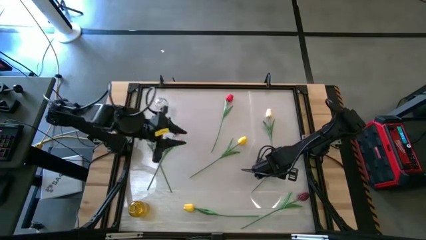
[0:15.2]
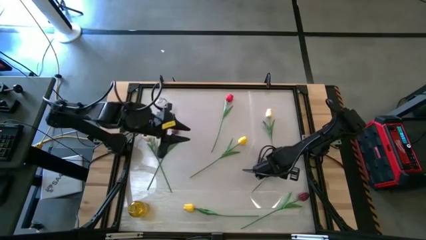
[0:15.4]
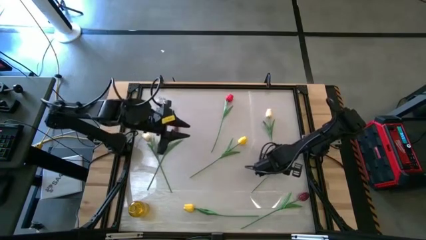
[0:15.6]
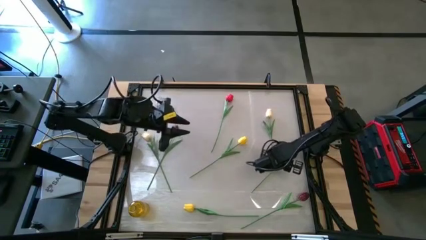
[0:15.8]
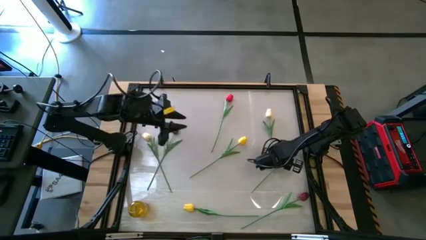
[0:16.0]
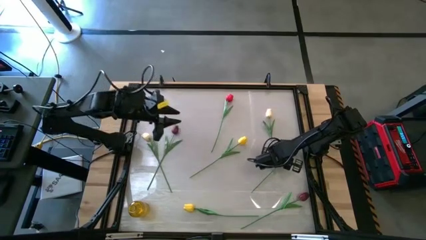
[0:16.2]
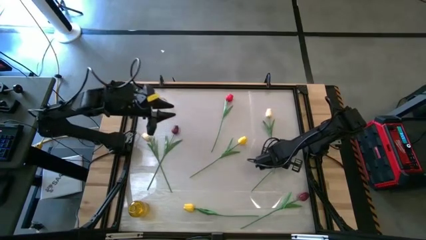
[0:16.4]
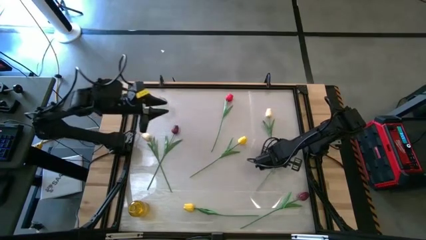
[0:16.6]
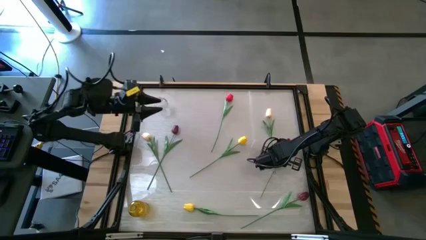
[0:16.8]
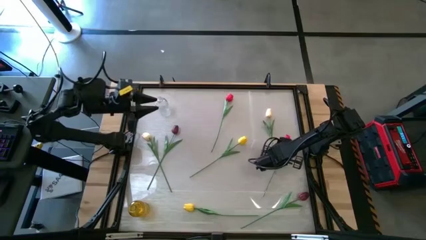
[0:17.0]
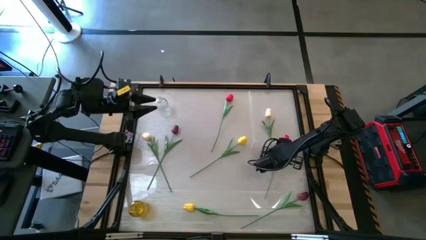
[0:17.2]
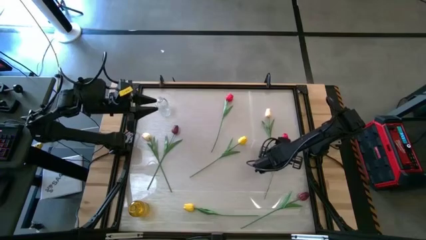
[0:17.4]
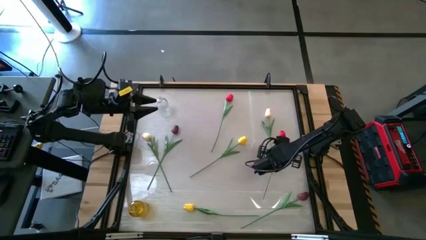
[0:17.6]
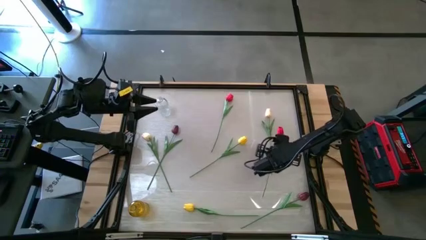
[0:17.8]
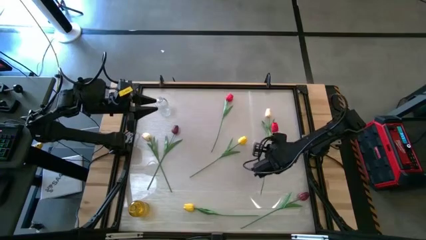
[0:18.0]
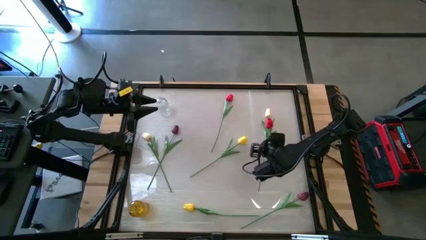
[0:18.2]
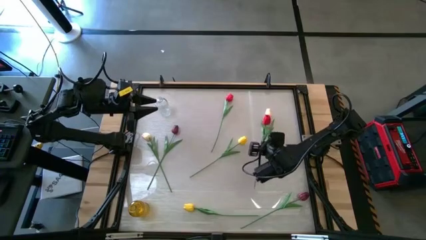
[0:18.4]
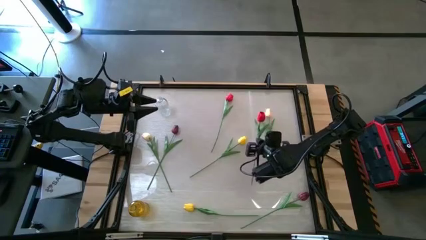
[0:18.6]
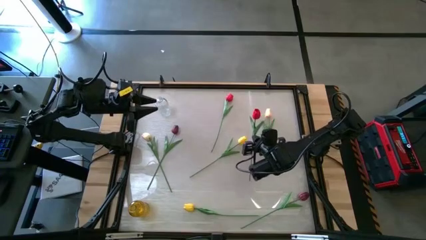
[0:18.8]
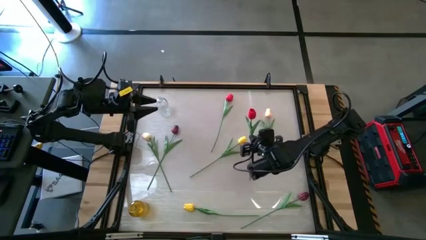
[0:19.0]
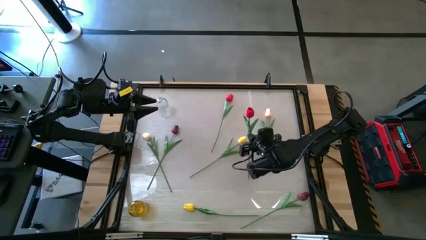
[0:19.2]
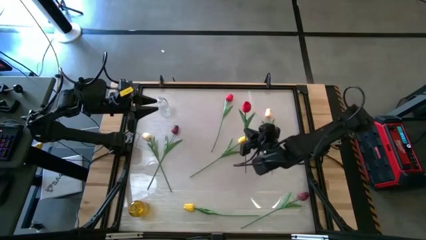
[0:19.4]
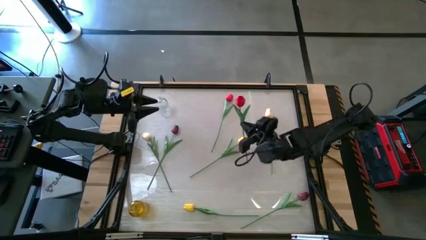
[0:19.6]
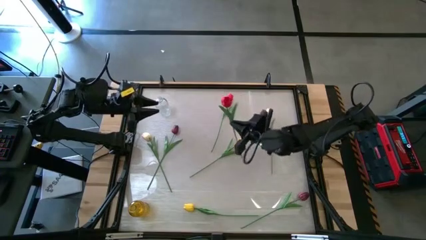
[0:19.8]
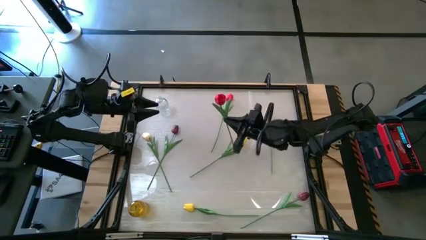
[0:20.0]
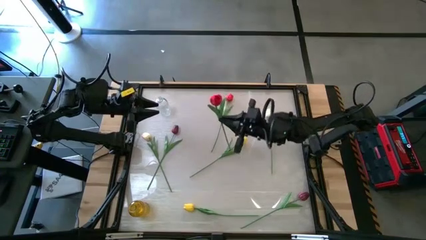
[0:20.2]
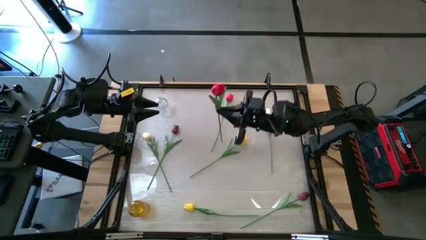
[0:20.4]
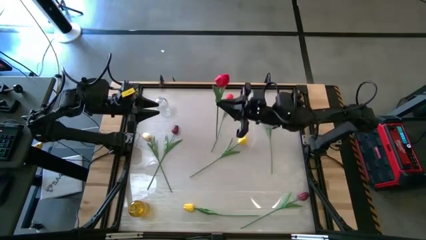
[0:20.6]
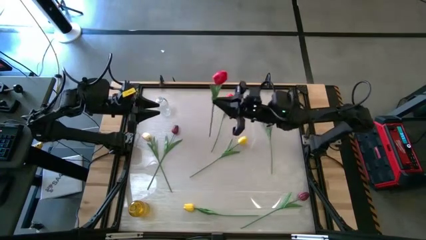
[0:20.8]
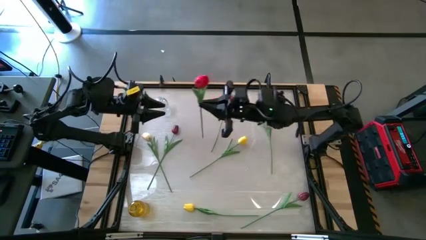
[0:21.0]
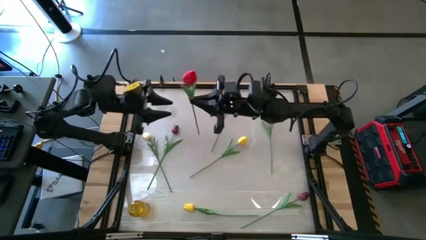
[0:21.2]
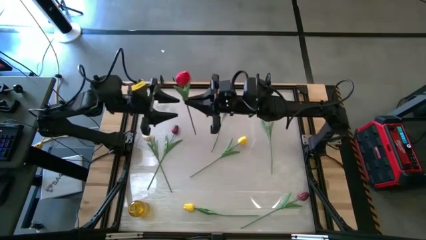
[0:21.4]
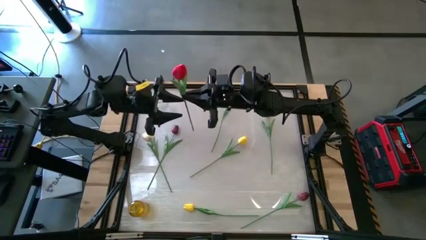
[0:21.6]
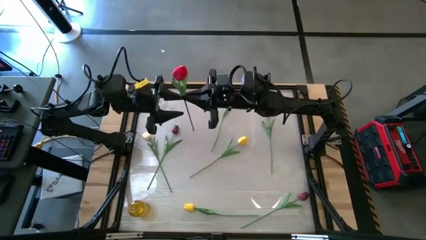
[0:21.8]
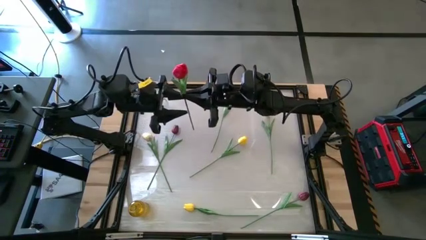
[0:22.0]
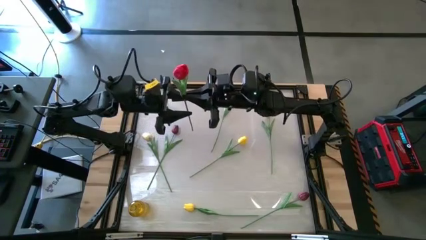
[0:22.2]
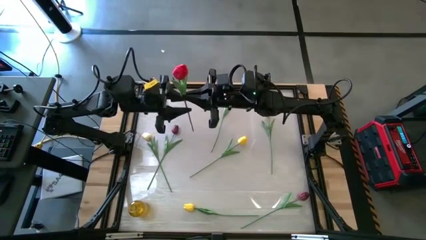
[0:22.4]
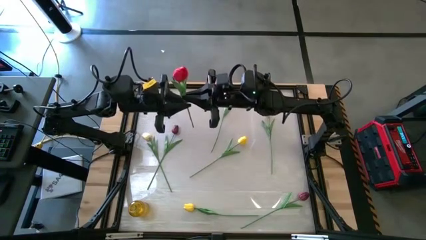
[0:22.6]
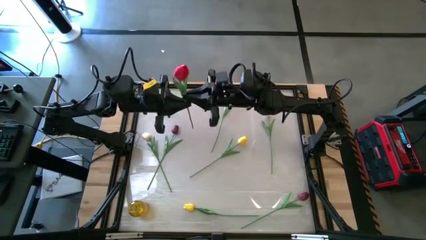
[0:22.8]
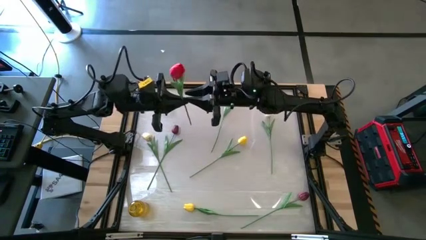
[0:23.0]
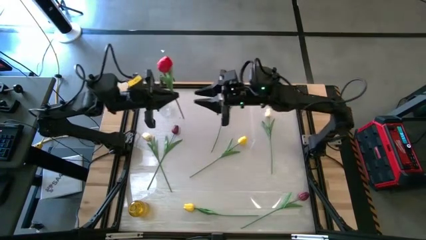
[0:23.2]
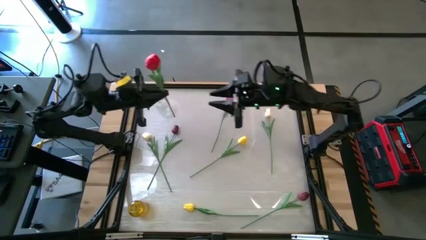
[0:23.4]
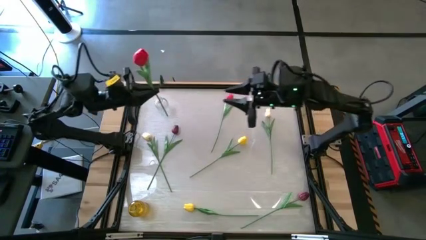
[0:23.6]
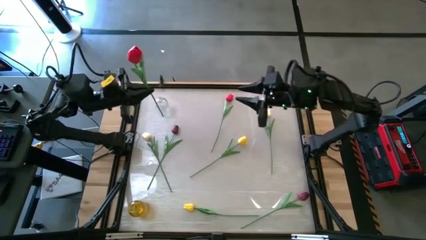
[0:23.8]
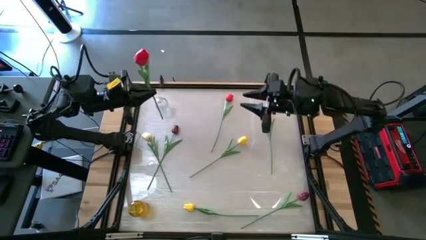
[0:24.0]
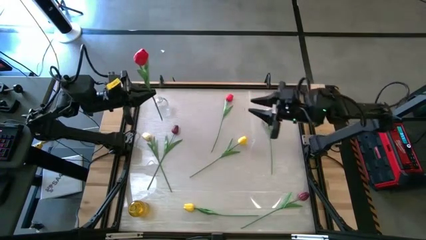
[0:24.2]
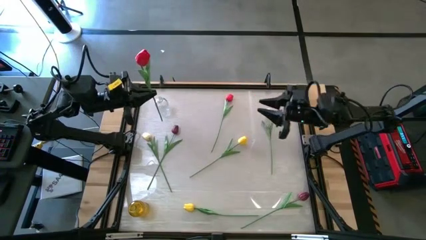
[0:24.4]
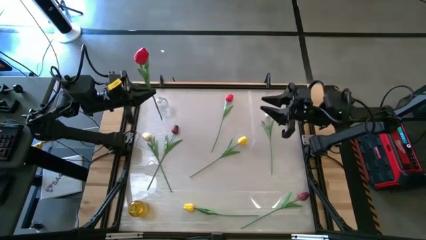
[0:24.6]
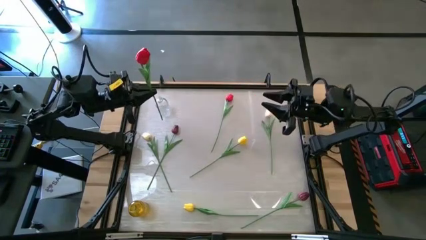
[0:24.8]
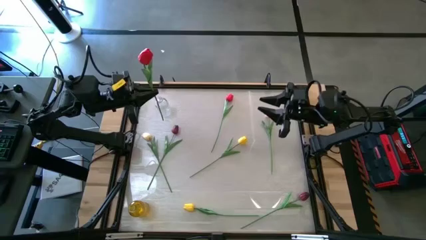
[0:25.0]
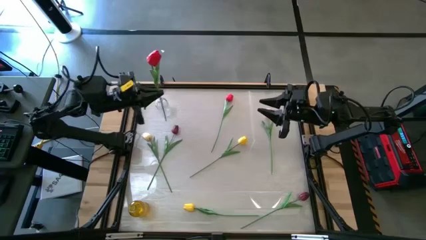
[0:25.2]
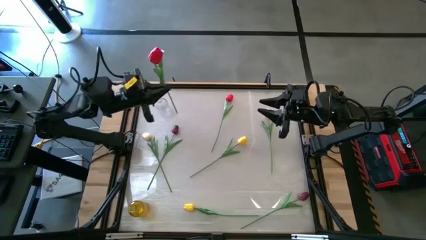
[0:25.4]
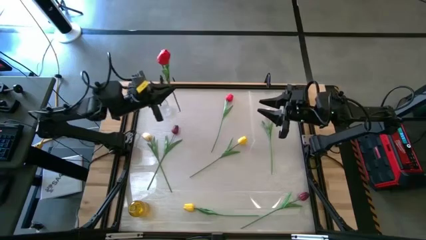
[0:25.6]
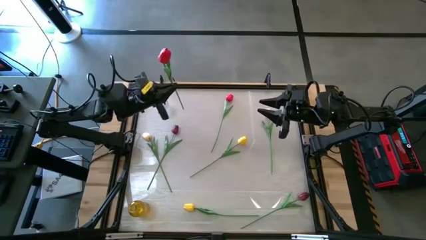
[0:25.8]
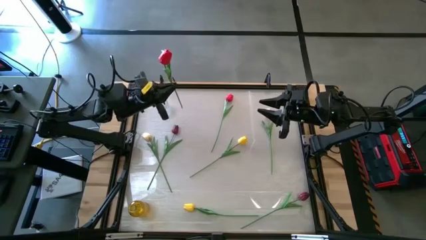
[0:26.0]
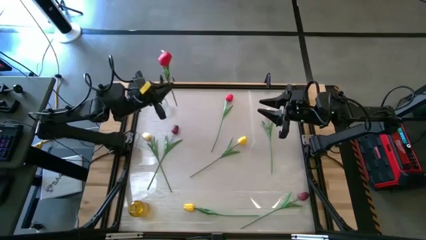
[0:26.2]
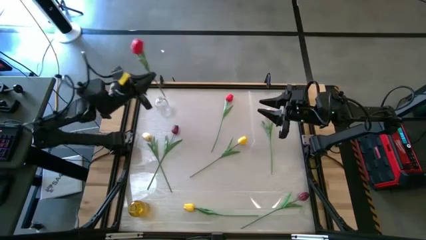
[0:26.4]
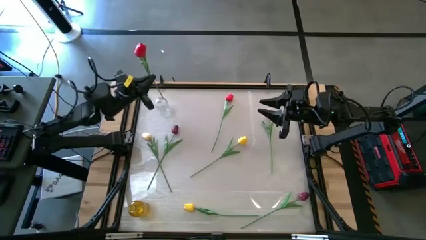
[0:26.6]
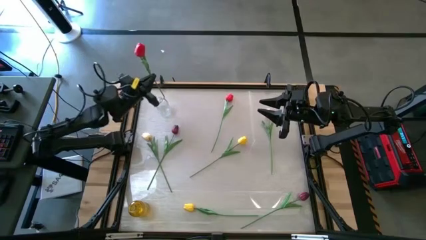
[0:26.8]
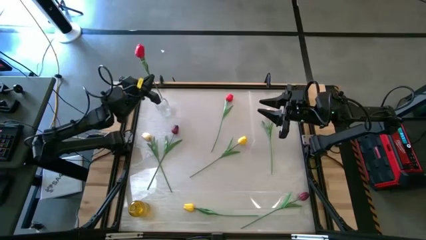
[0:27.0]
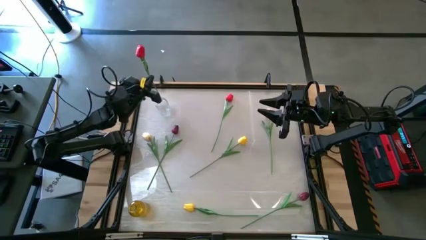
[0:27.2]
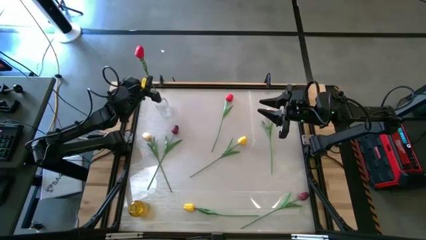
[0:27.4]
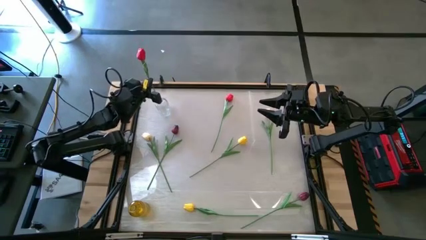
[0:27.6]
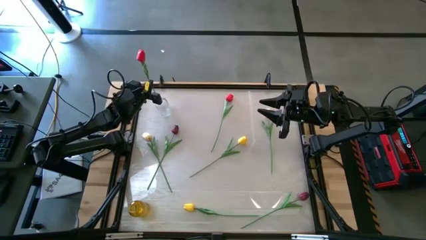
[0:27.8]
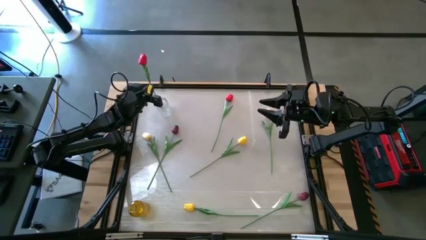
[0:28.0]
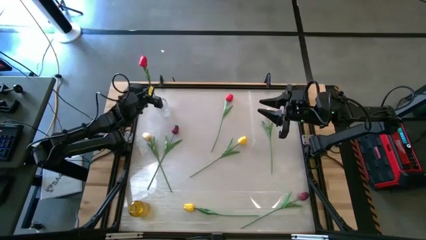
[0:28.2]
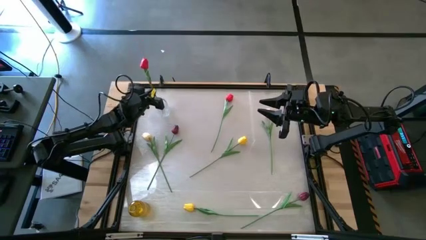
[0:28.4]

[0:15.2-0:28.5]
Task: Sort flowers into vase by color
Put the bottom red flower into the transparent vase

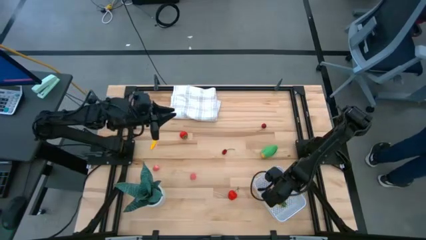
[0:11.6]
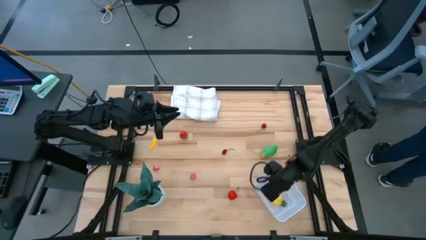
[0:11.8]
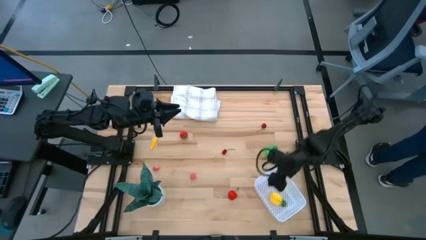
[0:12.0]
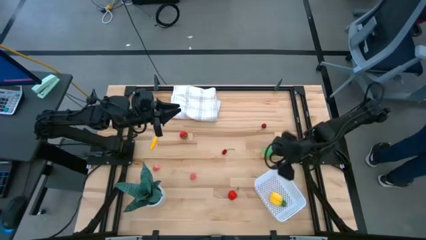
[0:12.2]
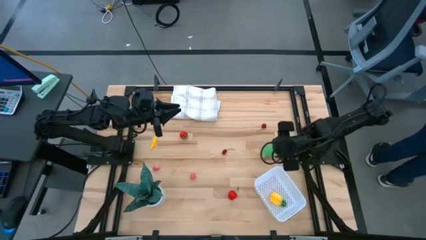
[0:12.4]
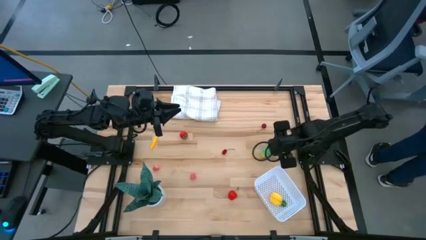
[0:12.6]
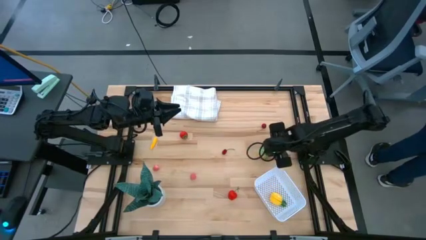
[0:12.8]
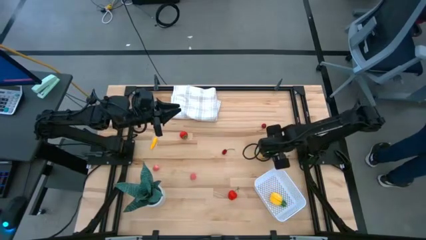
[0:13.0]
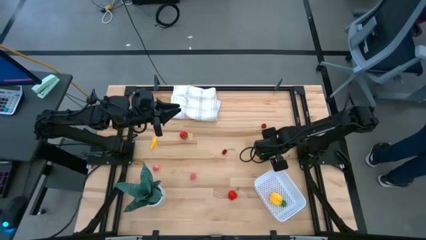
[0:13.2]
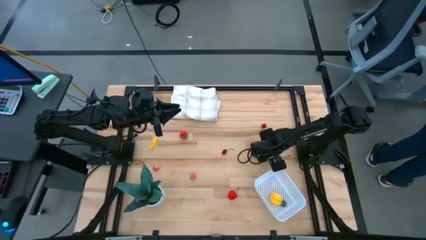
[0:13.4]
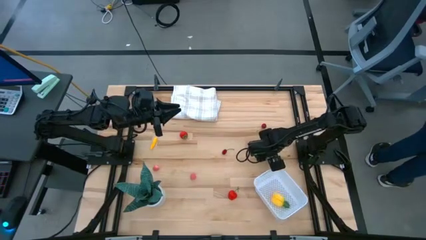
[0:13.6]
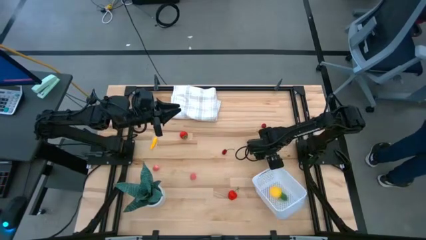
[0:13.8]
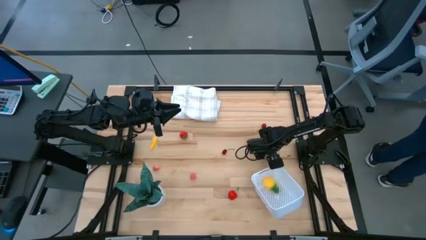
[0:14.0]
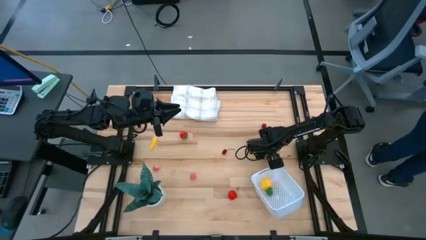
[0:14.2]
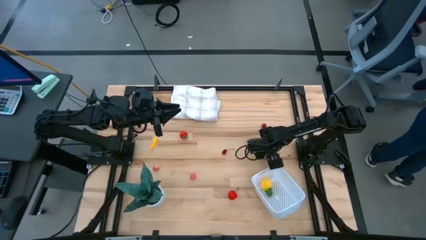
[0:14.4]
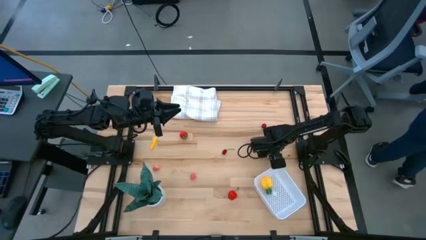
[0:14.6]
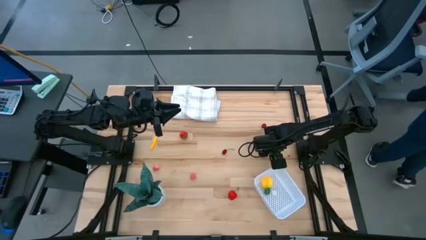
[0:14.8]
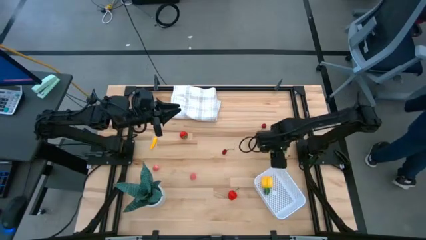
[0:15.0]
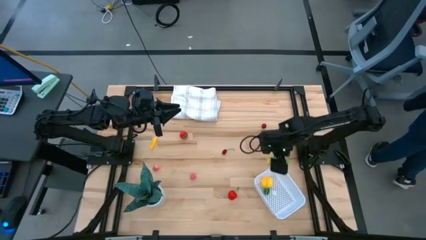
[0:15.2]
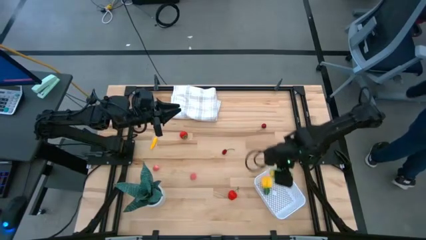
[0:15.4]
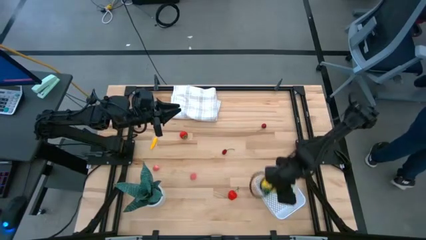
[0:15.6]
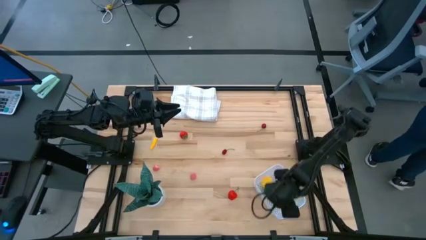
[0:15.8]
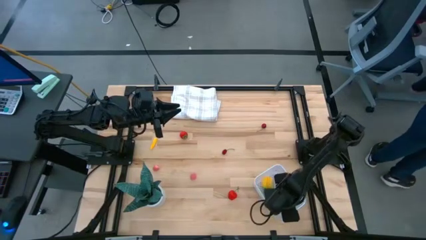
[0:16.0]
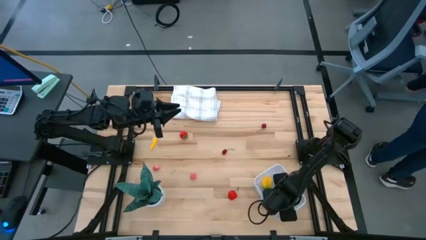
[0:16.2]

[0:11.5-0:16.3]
Task: Pick and placing Produce into tupperware
Put the green corn into the white bin
